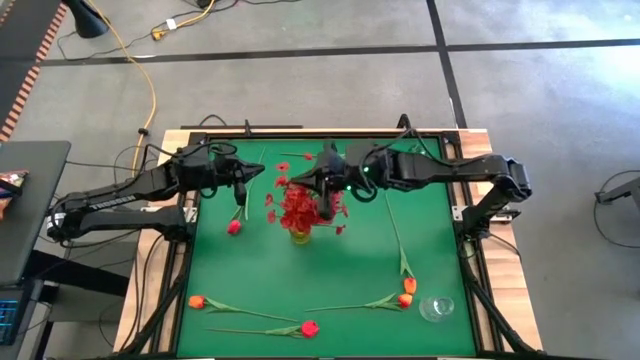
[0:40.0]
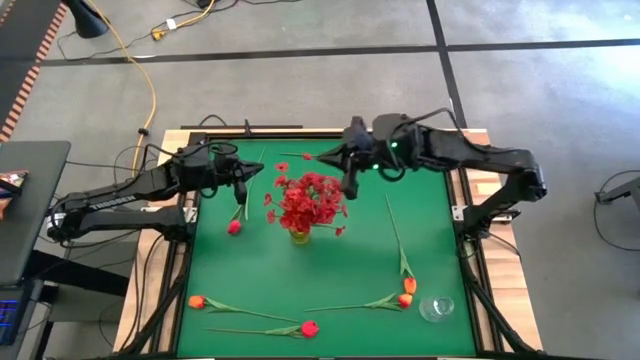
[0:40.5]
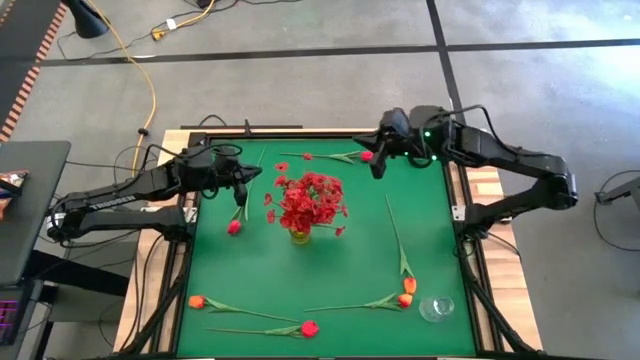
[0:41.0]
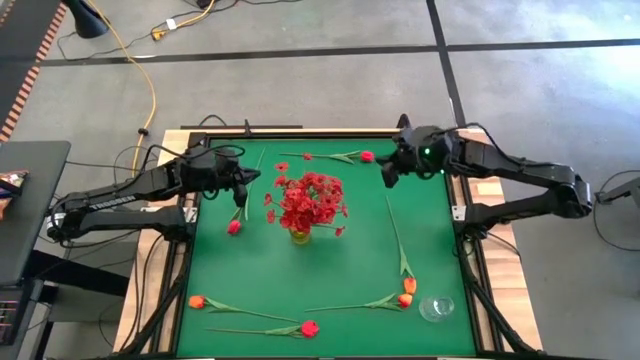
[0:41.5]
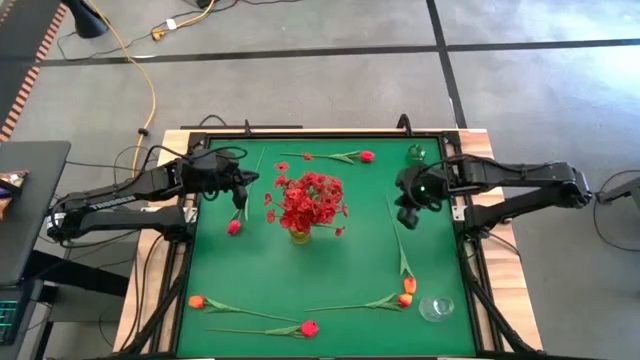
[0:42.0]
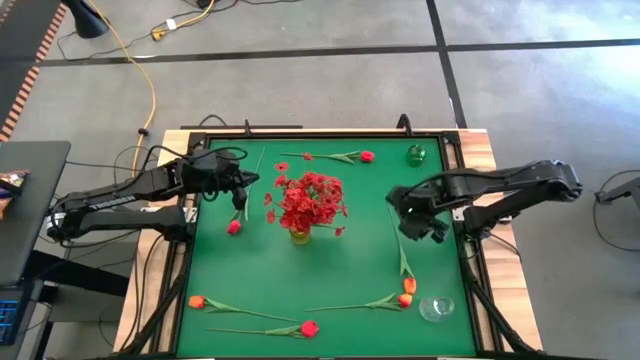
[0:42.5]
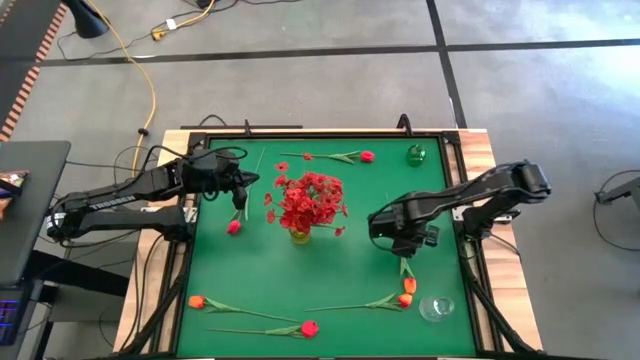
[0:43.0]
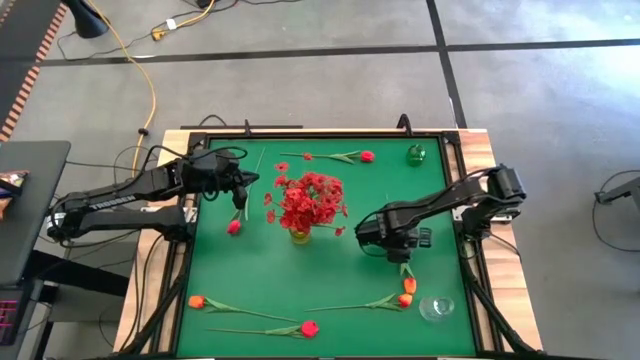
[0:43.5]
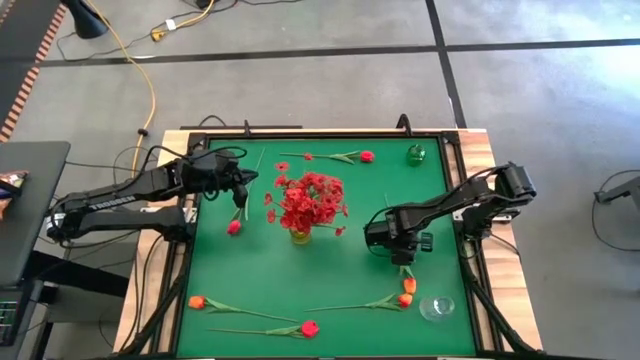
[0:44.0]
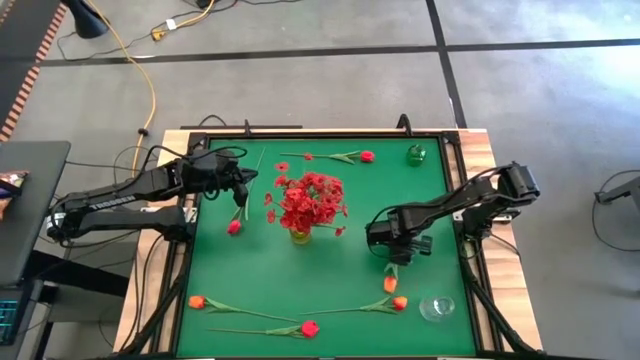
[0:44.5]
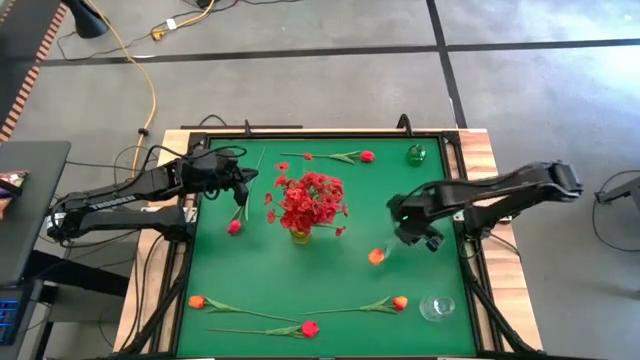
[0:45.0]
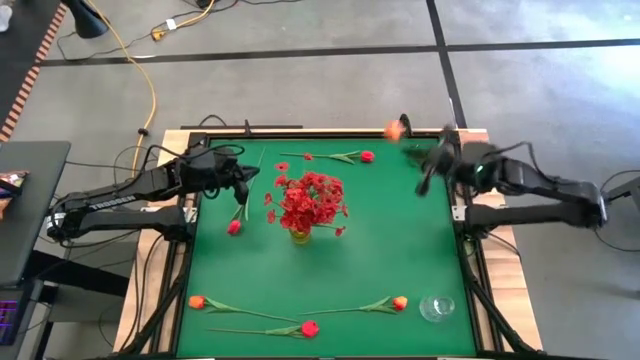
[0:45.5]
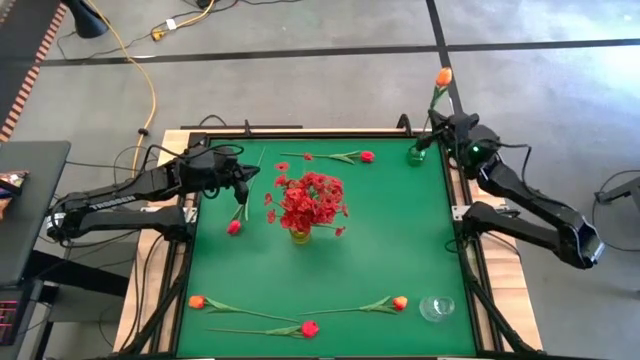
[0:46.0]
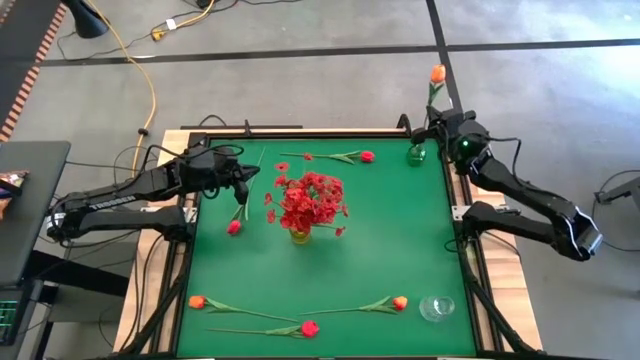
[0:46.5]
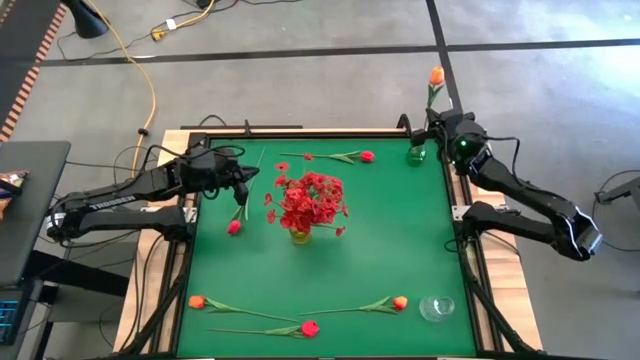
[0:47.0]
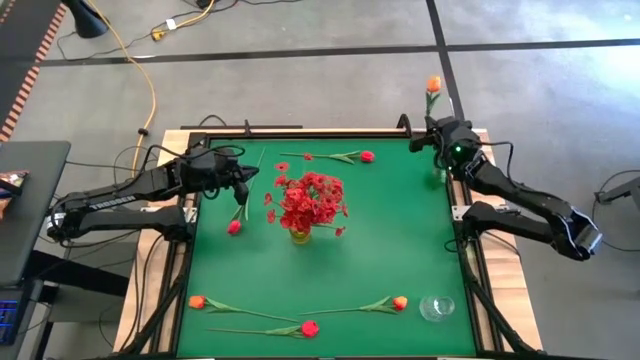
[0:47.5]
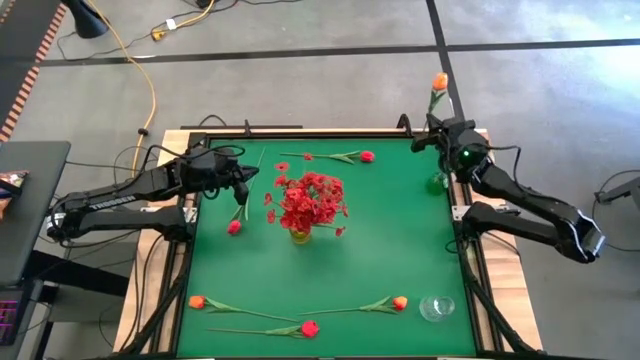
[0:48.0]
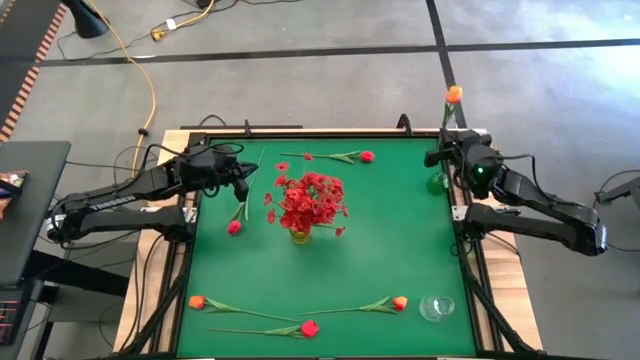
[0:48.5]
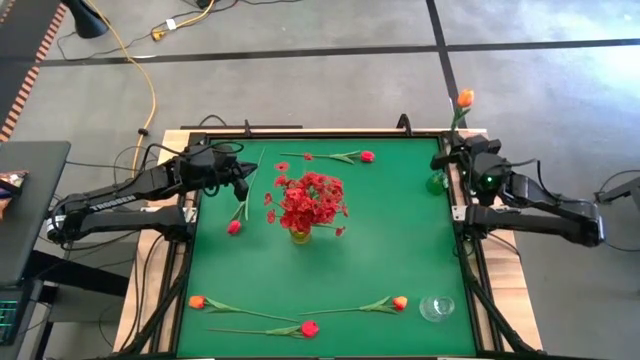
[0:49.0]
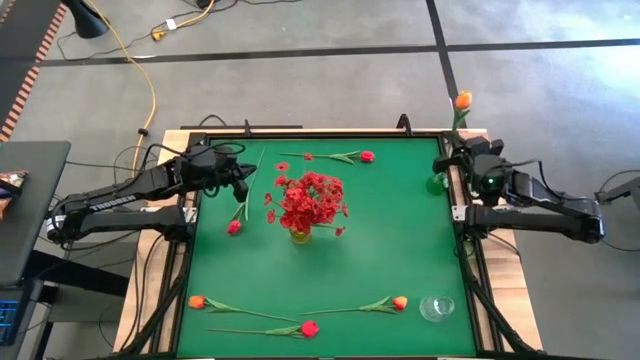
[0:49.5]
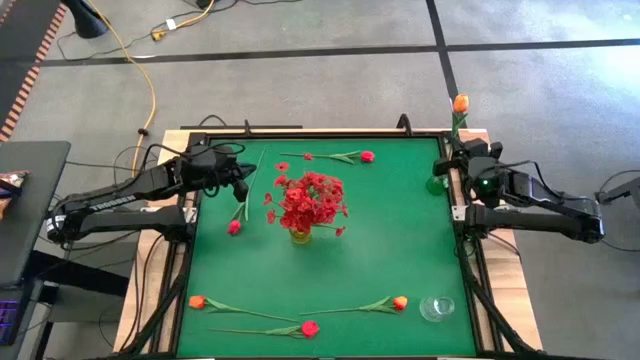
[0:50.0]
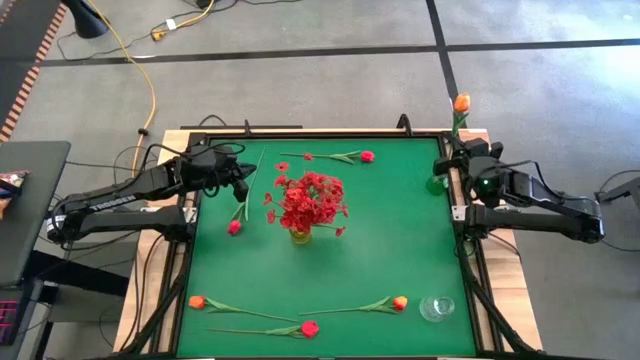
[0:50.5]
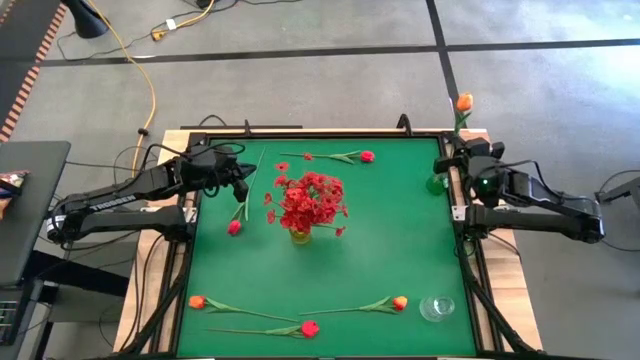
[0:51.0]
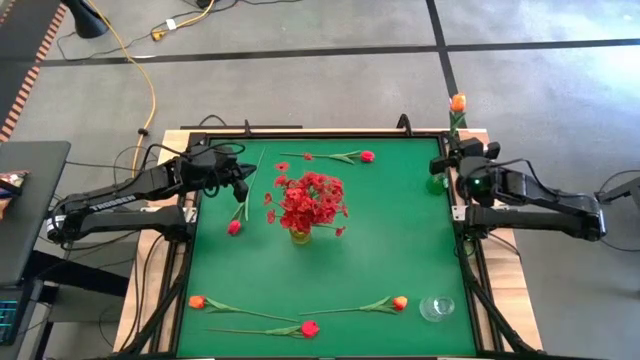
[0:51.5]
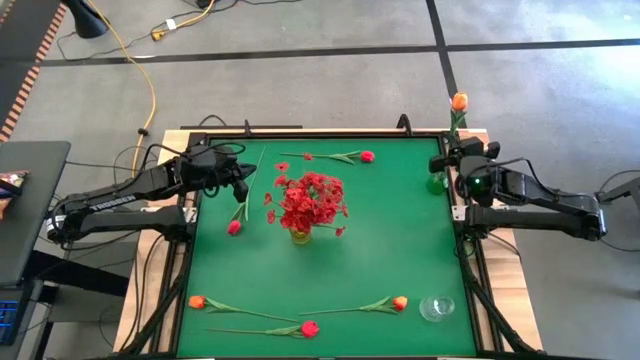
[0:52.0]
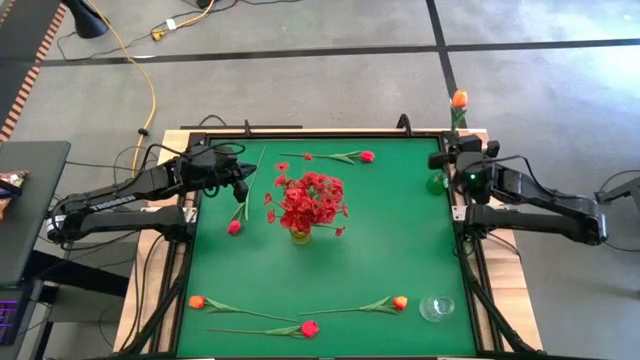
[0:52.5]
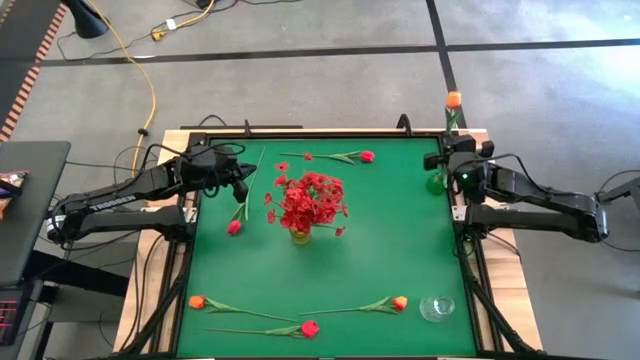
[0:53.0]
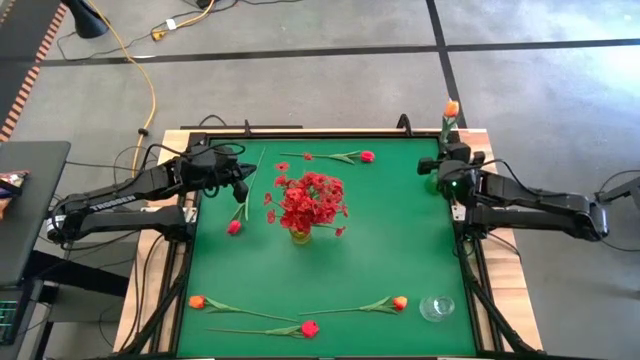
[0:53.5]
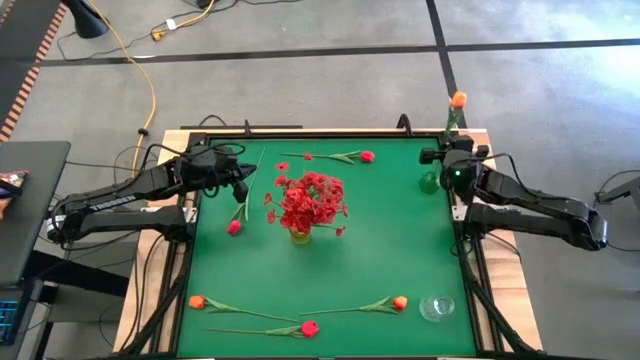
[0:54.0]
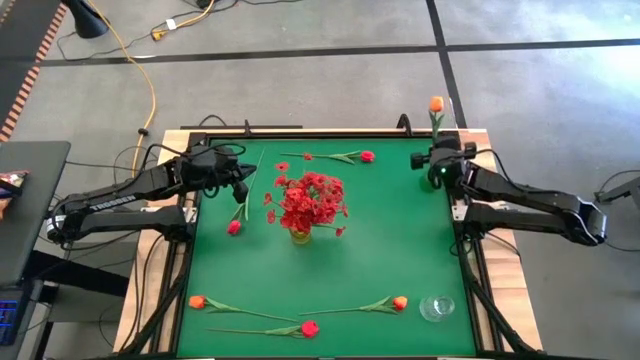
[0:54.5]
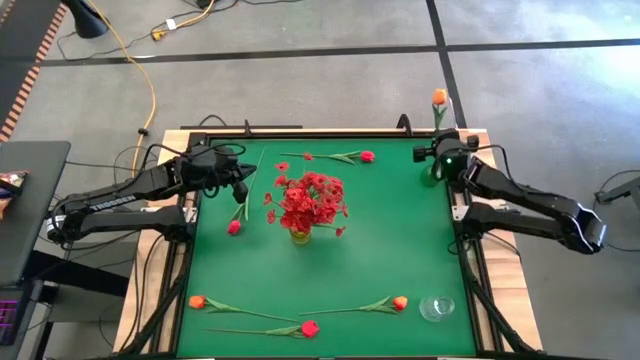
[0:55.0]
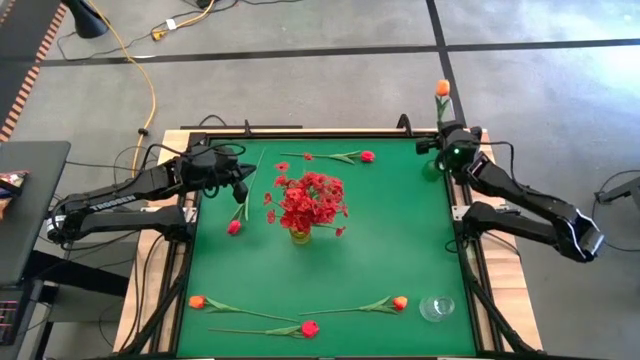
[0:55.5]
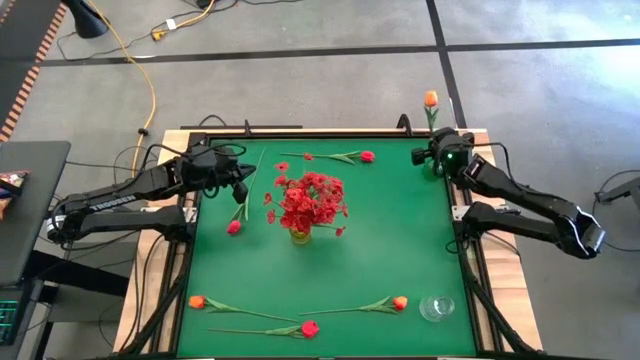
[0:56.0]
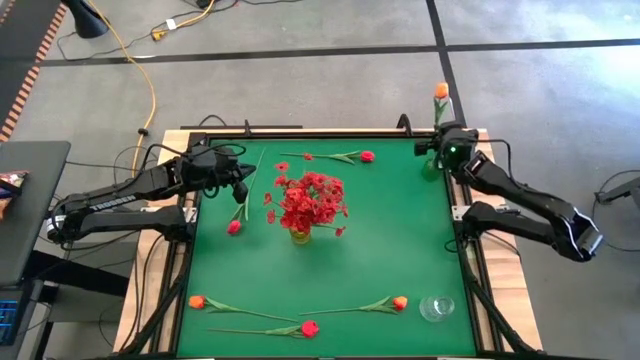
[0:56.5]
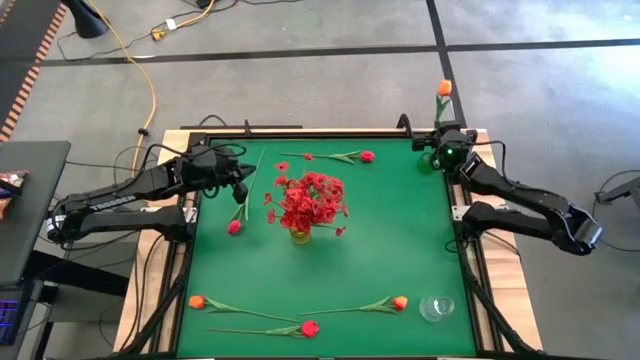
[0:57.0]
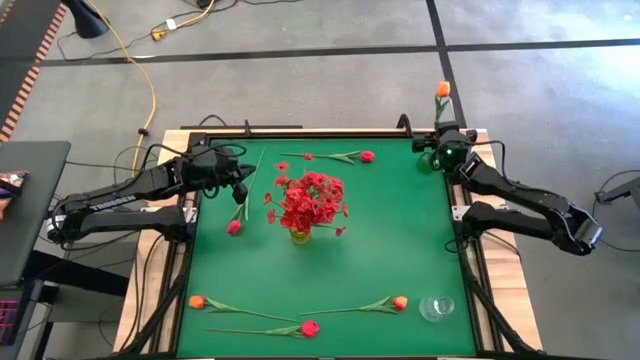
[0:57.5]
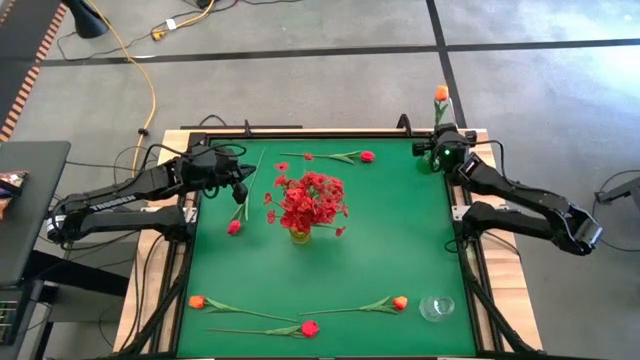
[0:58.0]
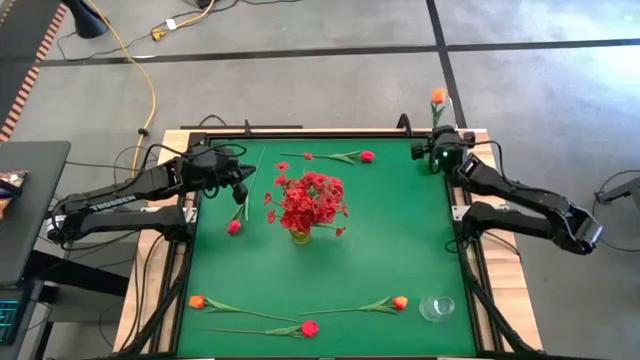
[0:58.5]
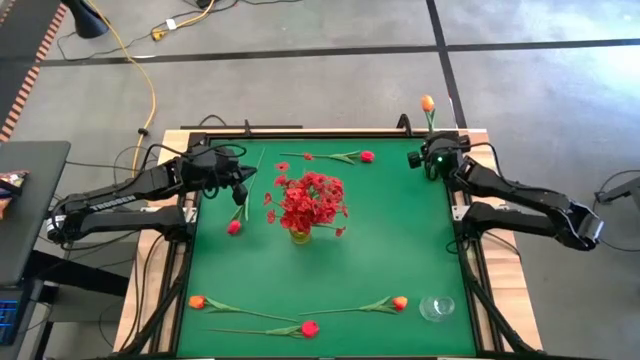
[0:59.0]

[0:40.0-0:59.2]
Task: Sort flowers into vase by color
Put the top orange flower into the green vase

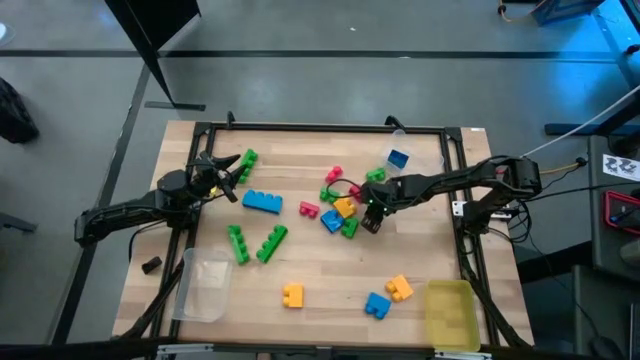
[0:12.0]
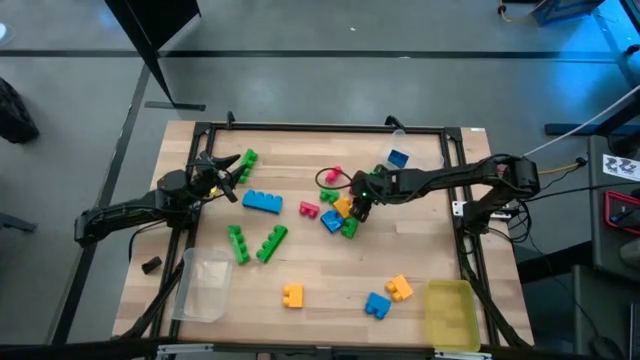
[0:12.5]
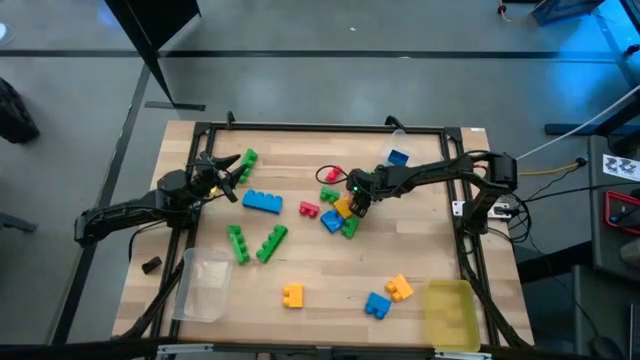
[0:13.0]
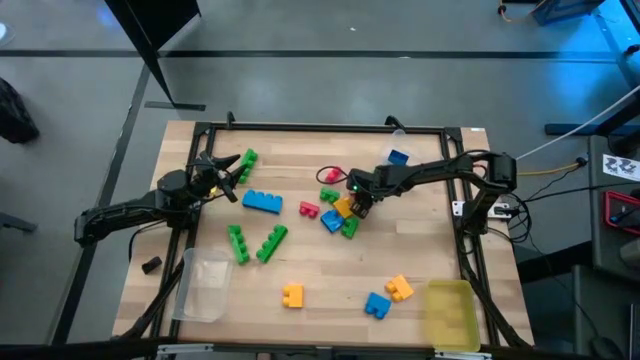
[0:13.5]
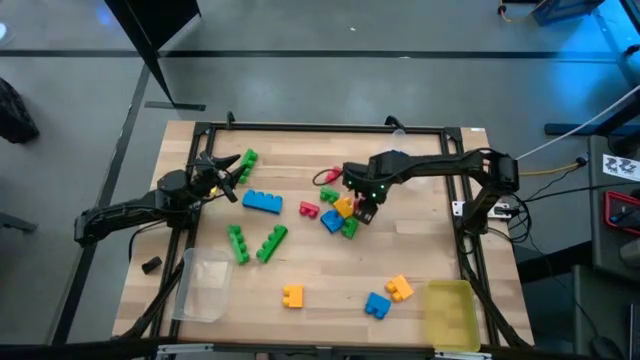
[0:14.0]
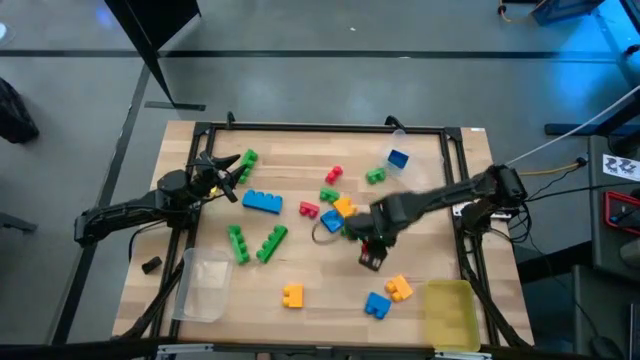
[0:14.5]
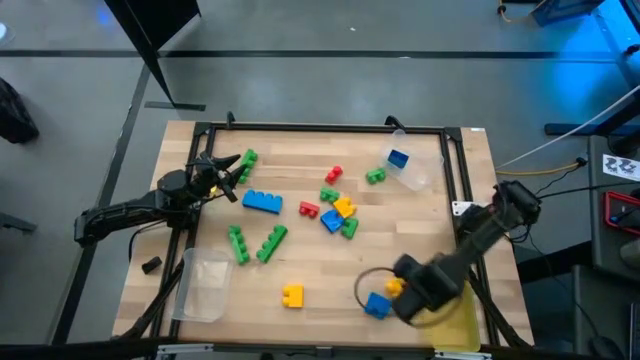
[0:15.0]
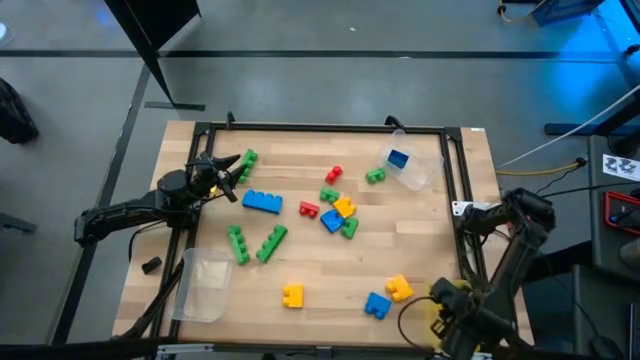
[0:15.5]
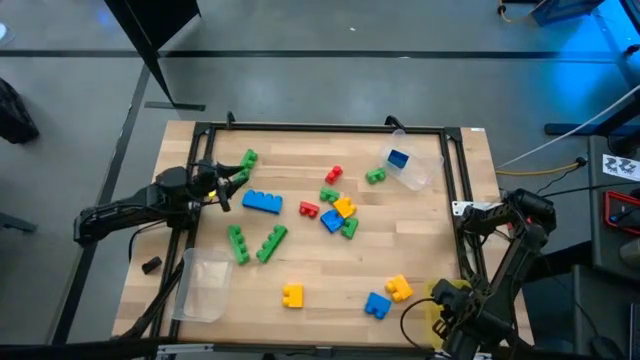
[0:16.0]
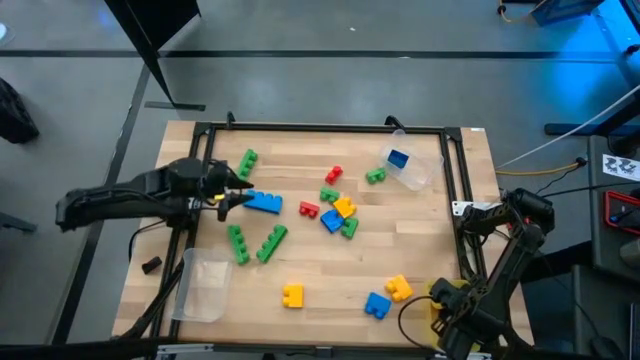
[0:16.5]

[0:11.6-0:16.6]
Task: Sort blocks by size
Put the middle right 2 stud red game piece into the yellow bin
